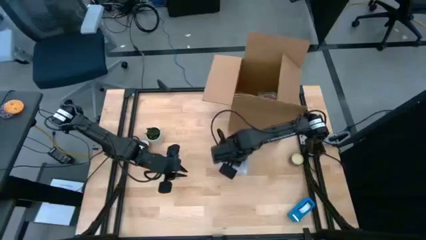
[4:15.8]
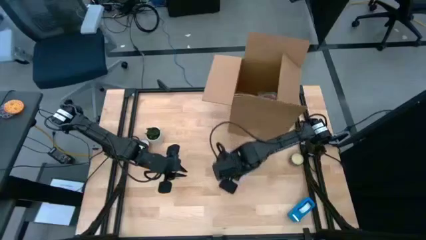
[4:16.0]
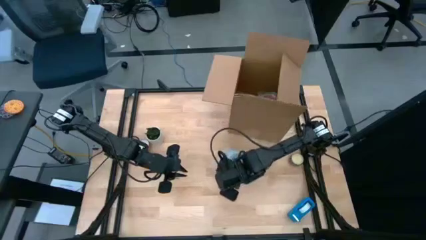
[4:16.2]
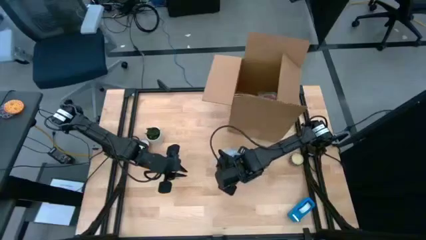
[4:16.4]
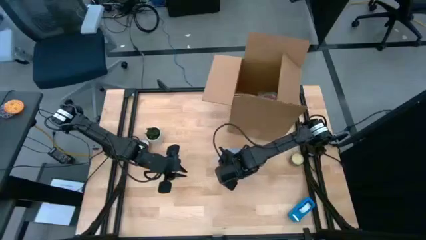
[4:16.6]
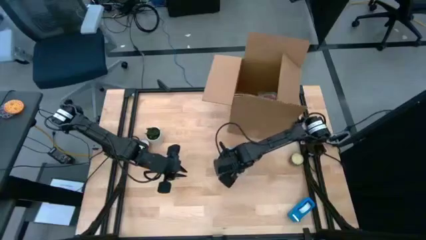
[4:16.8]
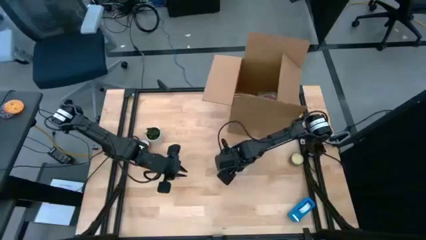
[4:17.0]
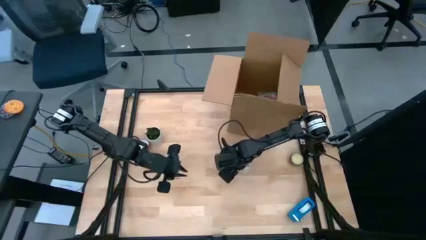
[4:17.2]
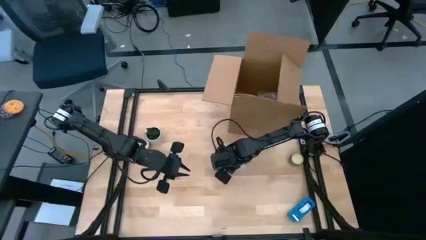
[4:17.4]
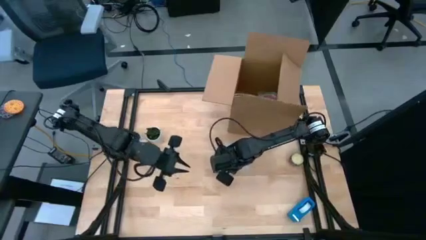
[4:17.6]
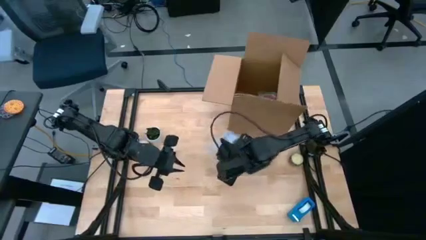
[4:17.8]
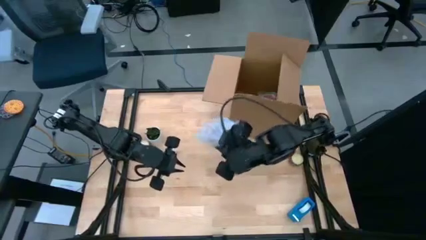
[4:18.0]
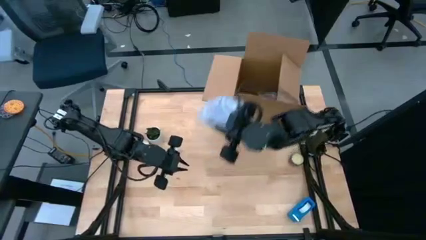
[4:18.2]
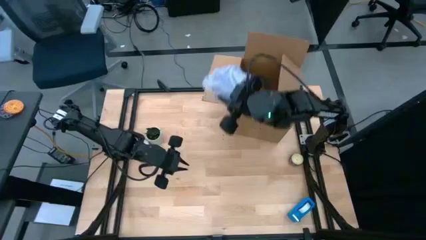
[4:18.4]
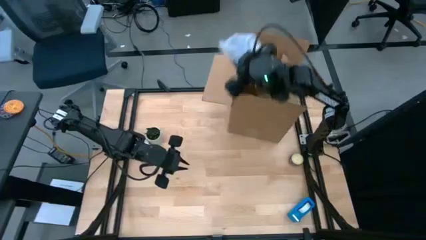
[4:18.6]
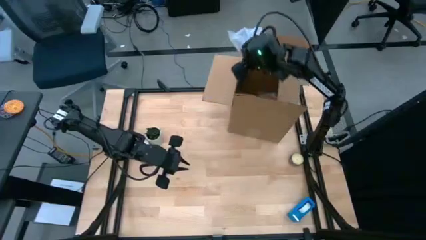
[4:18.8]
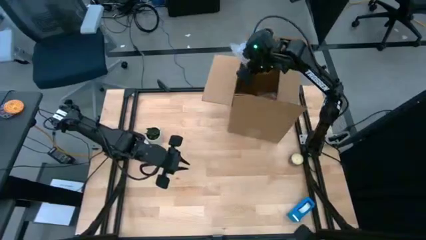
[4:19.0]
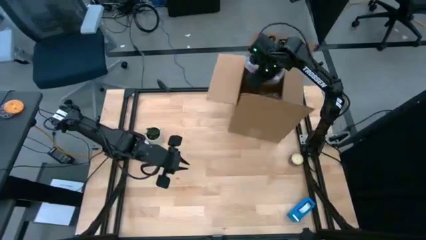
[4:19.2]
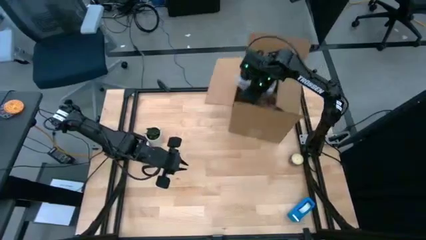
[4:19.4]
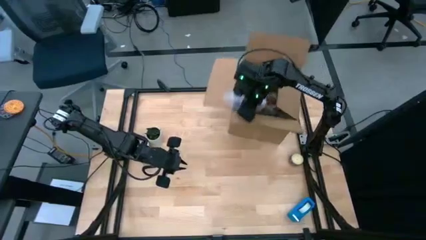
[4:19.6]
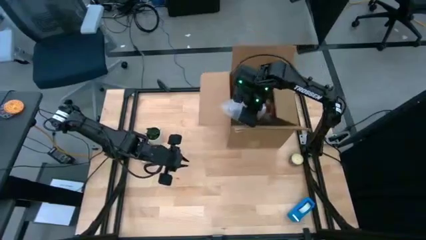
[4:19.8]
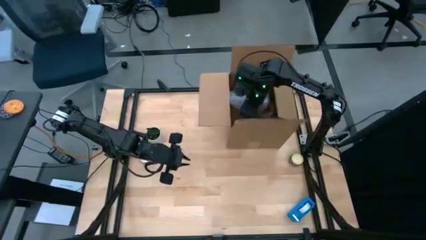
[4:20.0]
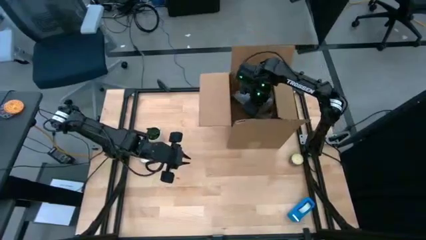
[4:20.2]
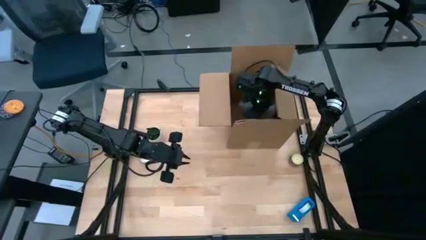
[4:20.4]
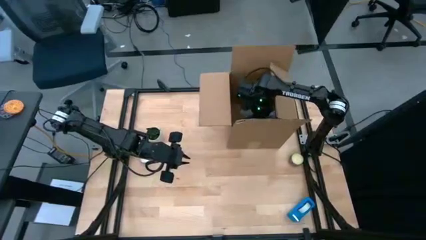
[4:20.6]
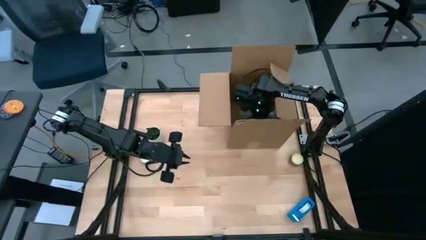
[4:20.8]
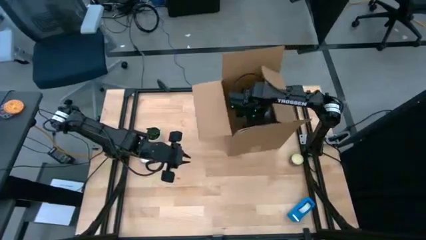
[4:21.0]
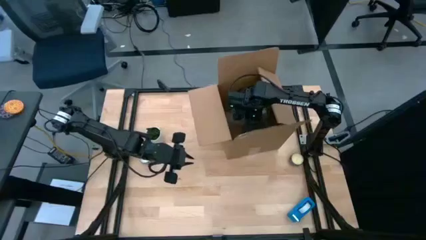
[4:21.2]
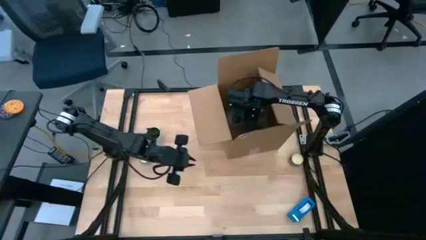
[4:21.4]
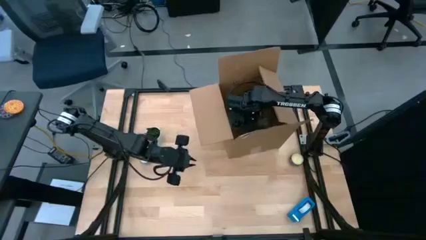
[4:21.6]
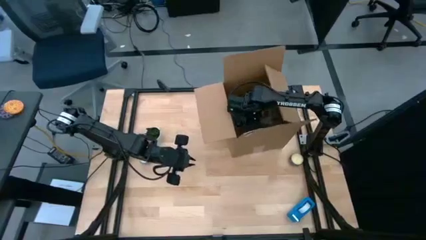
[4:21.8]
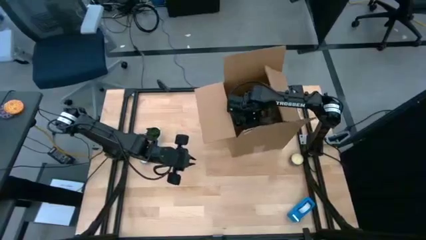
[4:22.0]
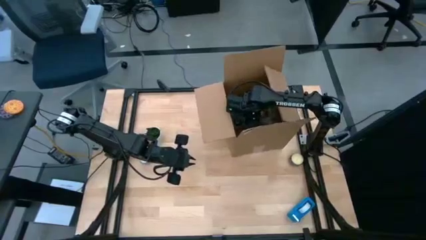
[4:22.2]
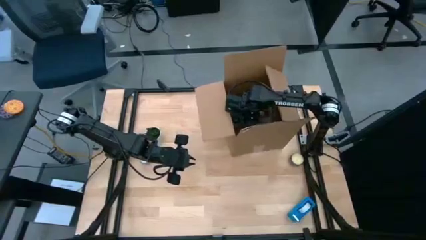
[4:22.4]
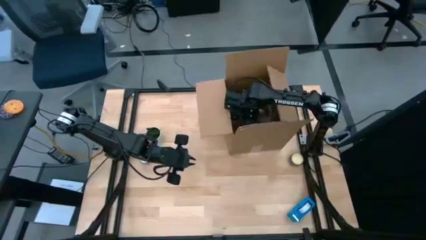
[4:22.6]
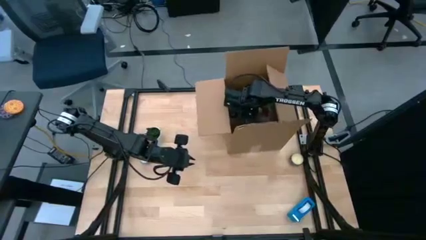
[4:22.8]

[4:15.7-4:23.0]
Task: wrap mug
Put the wrapped mug into the box

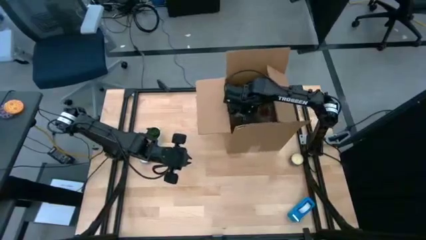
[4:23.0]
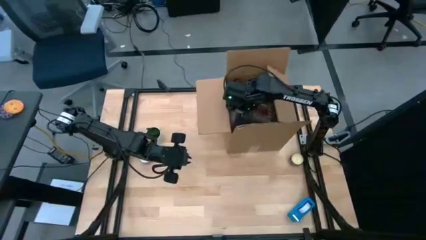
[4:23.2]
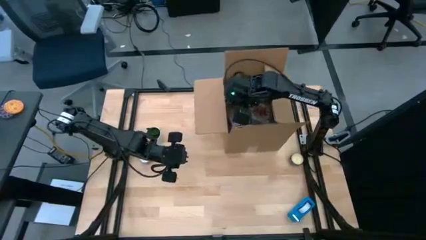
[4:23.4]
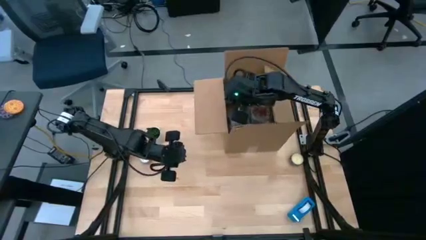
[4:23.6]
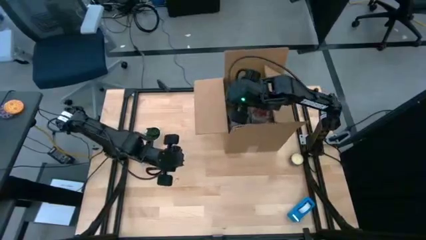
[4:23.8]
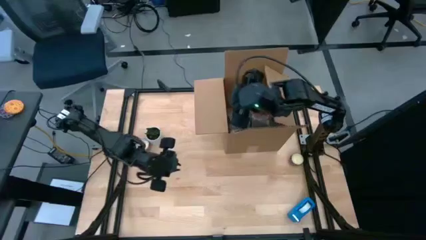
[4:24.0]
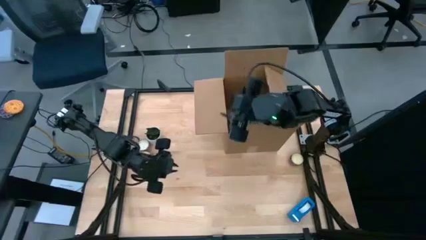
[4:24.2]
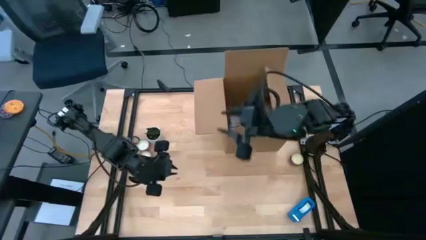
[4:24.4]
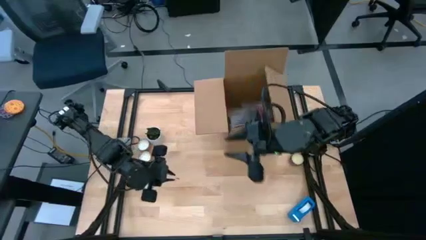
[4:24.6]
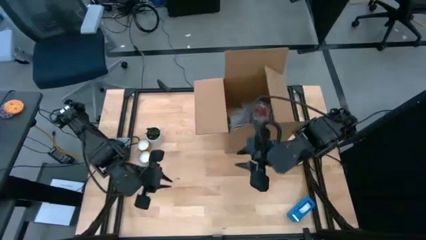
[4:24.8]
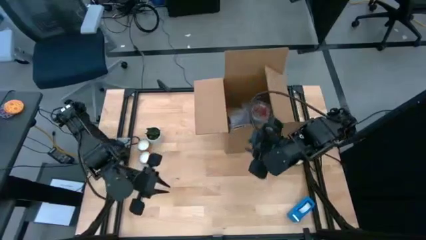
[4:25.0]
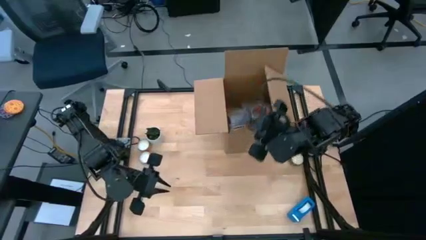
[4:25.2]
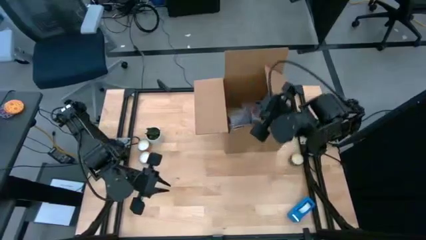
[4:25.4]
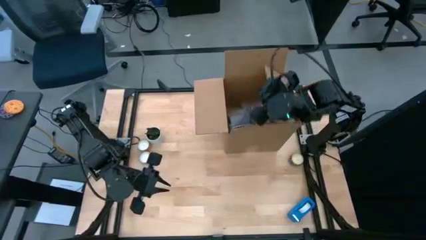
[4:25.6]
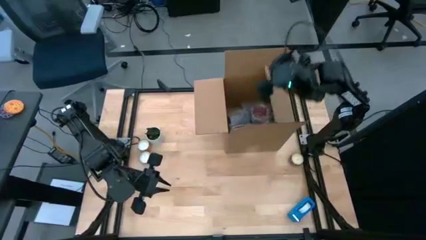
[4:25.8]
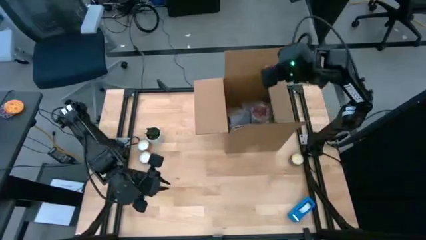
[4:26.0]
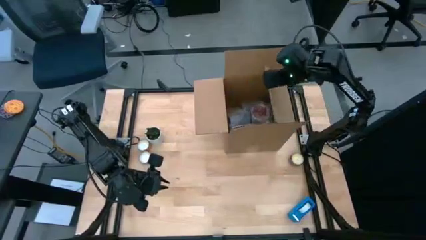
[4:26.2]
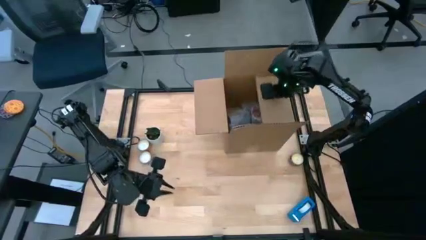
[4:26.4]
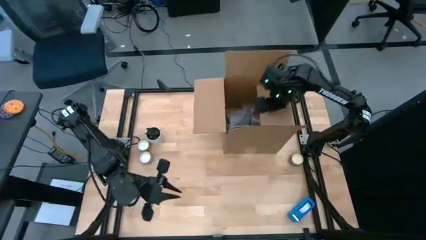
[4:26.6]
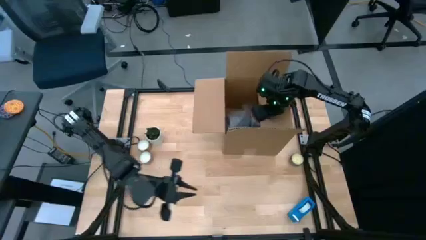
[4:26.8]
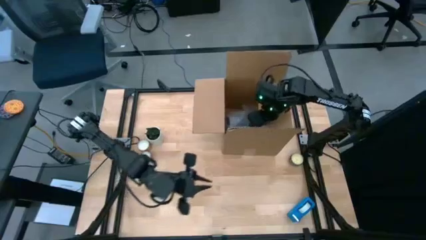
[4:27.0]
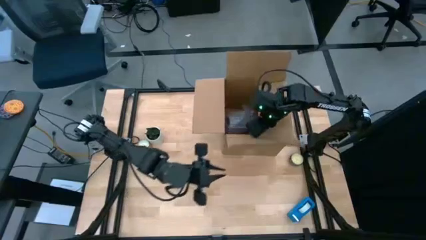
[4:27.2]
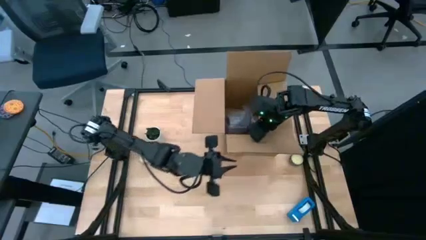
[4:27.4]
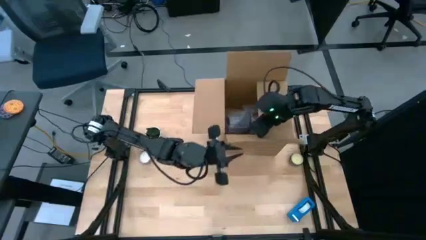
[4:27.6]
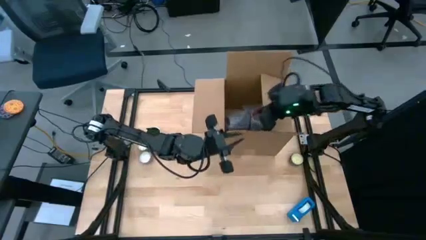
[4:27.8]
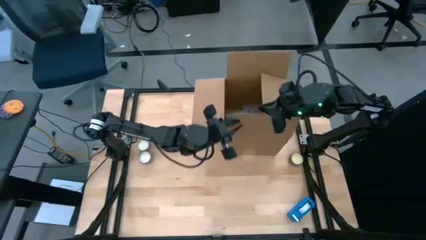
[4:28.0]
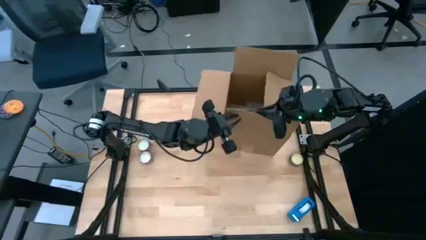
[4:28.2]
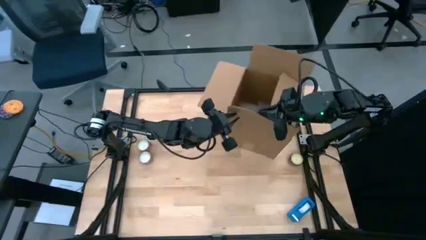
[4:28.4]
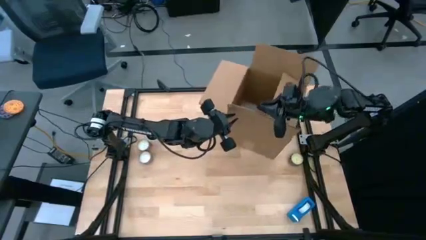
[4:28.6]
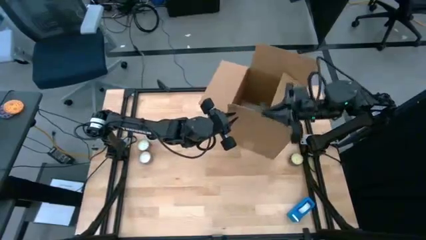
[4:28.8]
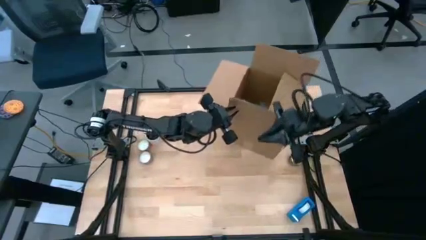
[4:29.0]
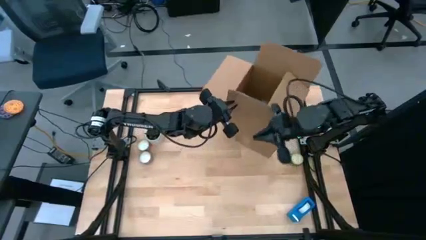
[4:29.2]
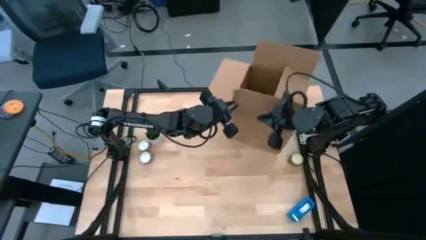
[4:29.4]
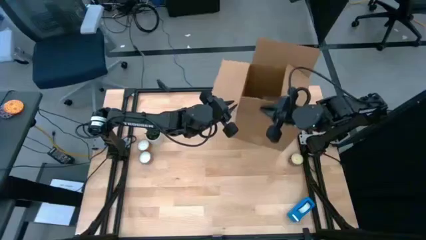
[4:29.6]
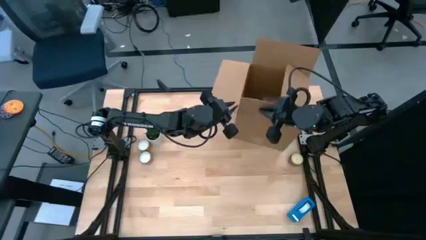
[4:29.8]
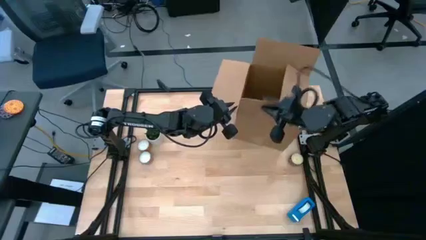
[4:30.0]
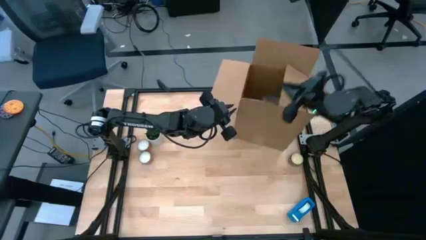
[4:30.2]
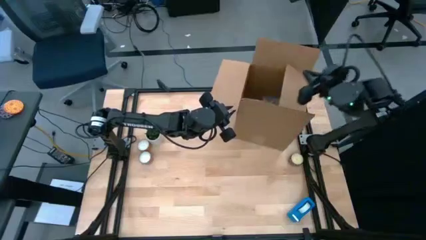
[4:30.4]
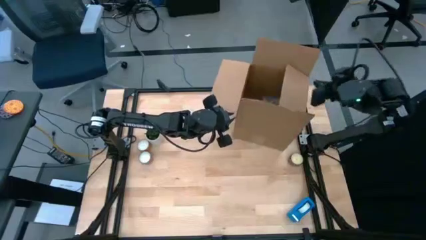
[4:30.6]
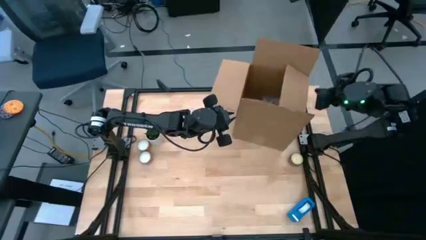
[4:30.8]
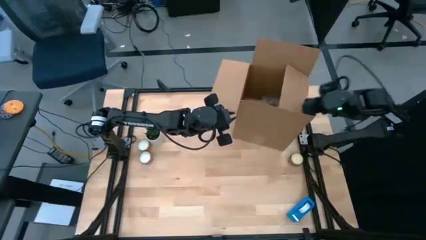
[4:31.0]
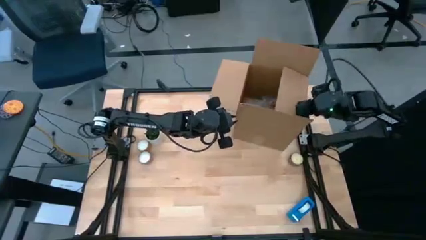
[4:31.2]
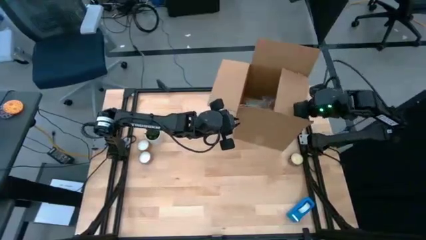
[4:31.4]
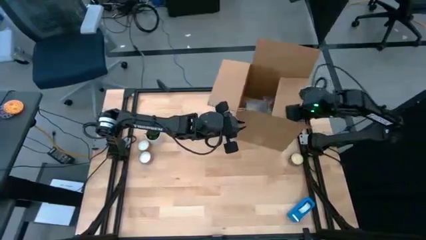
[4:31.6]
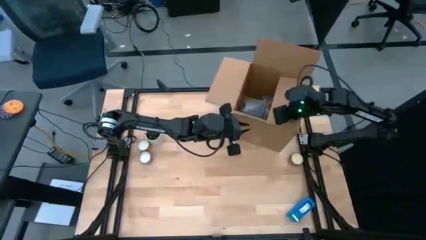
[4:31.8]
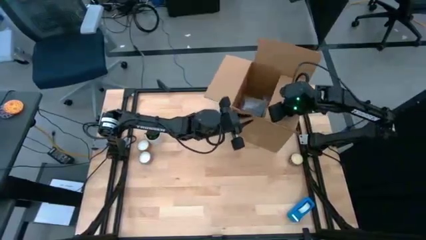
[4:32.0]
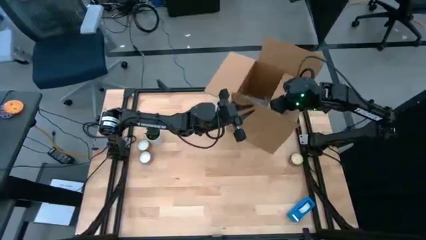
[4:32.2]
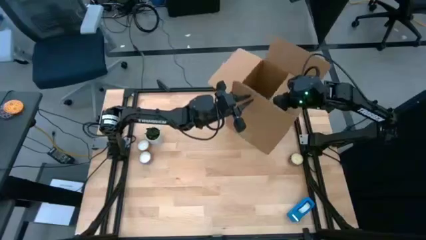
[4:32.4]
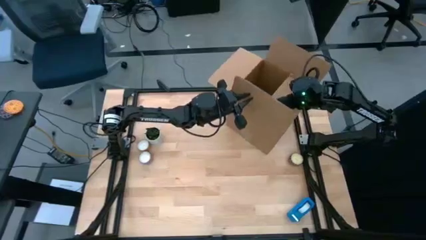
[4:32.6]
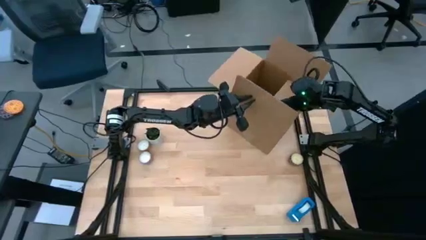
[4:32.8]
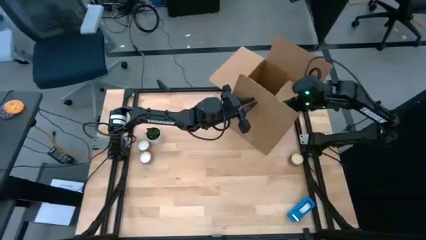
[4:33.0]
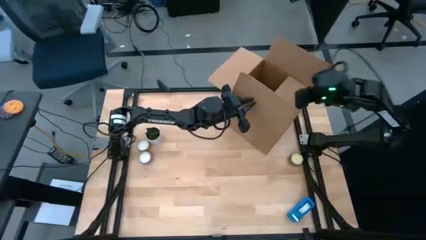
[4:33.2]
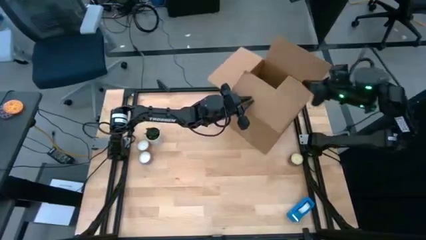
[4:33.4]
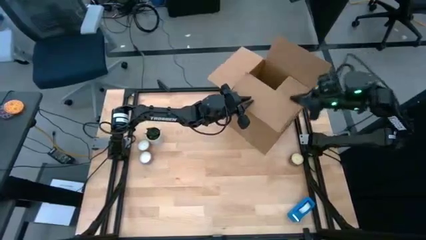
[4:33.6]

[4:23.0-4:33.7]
Close the box
